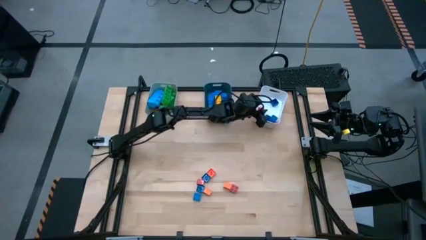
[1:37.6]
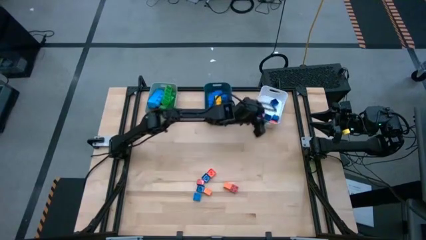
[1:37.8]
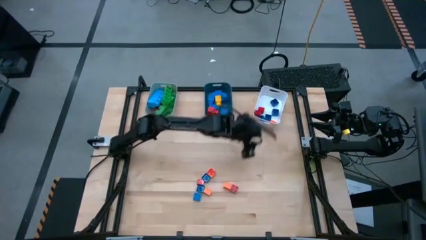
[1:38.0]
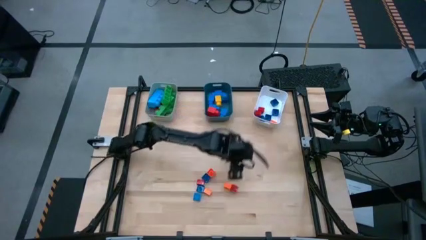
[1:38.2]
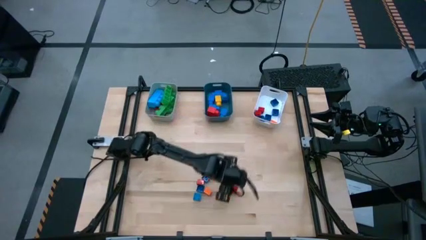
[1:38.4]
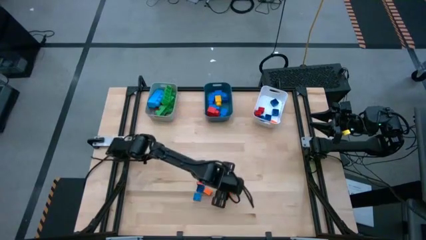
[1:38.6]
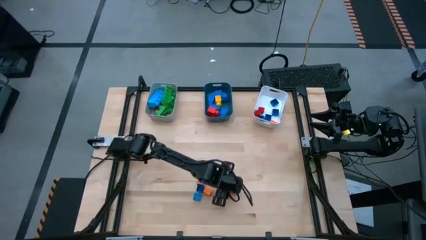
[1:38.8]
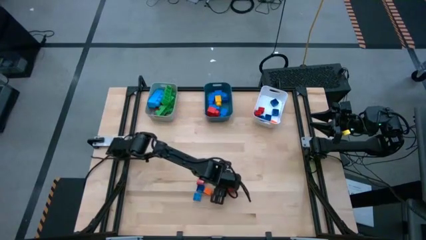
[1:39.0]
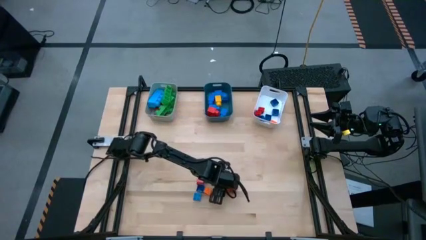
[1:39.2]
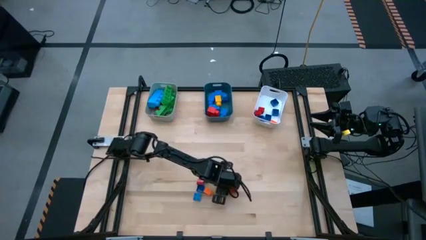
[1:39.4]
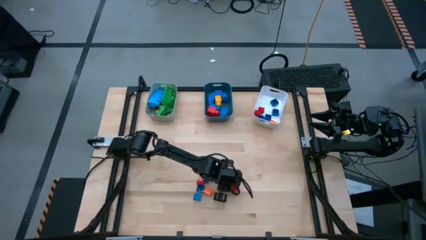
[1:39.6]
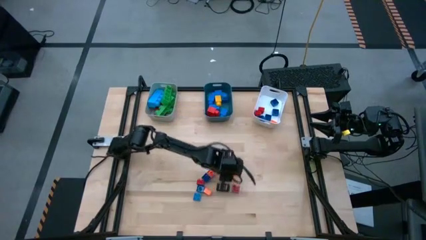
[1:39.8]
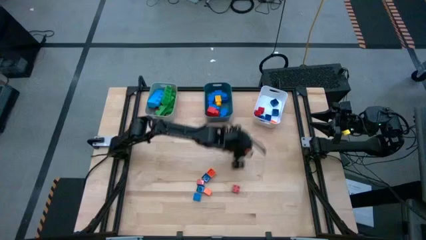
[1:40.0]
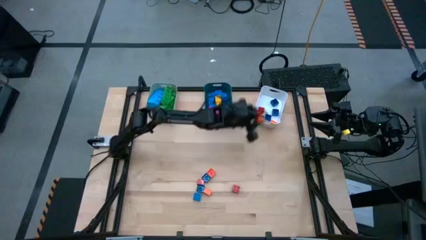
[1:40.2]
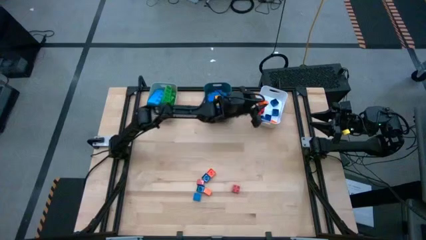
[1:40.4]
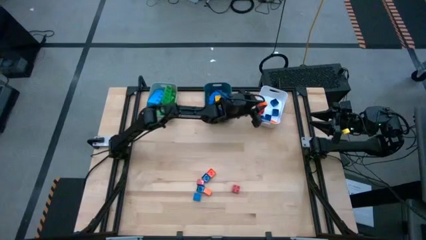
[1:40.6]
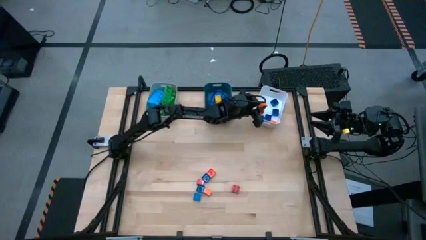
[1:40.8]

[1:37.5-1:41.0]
Task: Sort blocks by size
Put the small orange 4 stud game piece into the white bin

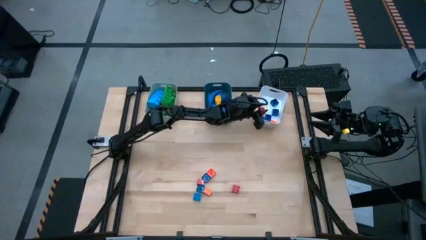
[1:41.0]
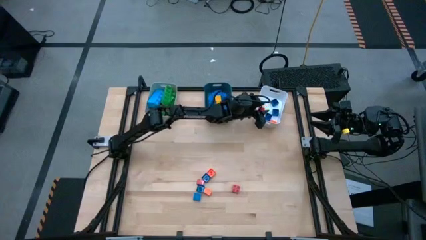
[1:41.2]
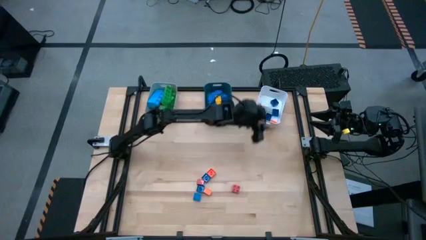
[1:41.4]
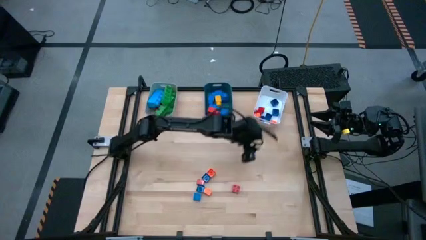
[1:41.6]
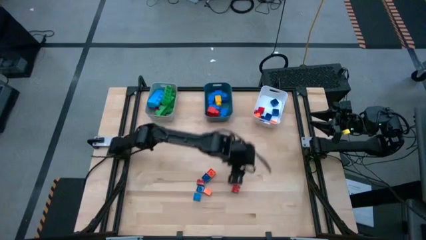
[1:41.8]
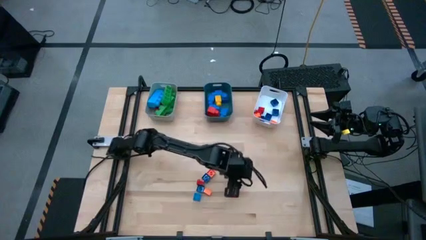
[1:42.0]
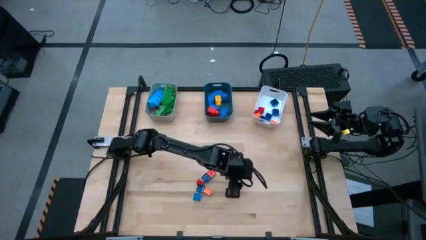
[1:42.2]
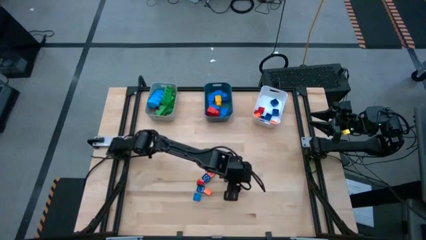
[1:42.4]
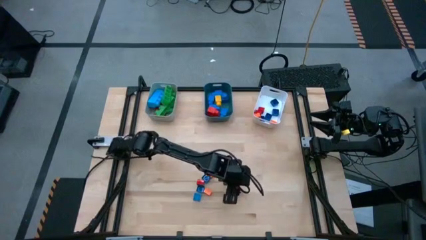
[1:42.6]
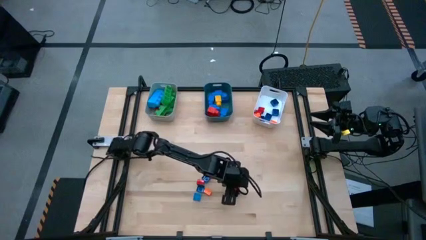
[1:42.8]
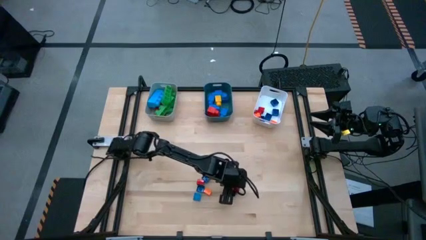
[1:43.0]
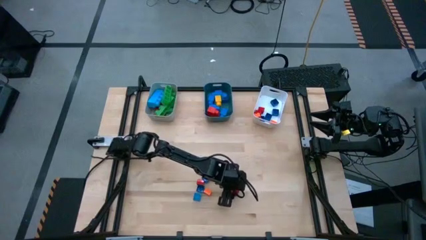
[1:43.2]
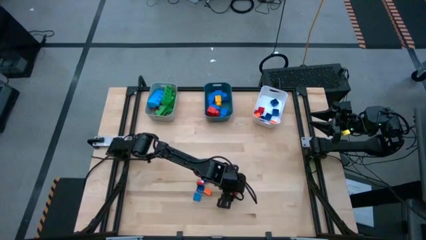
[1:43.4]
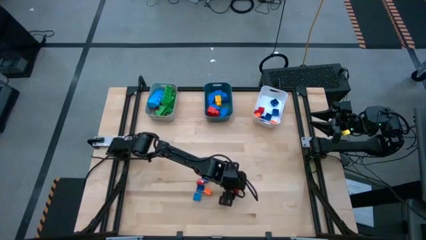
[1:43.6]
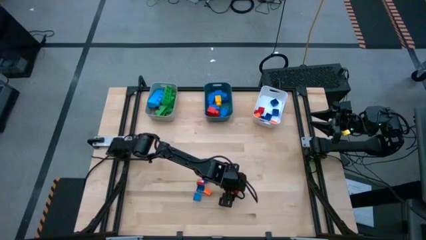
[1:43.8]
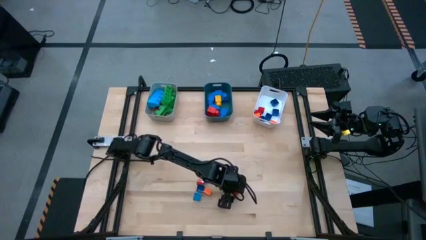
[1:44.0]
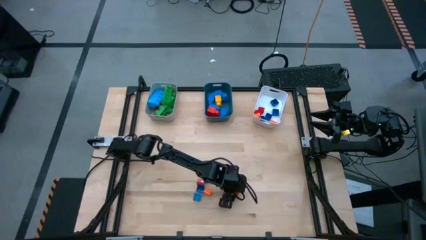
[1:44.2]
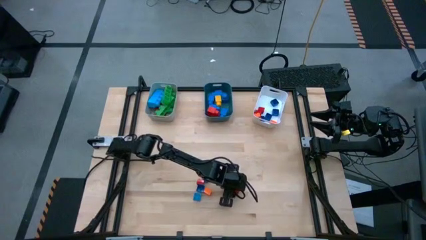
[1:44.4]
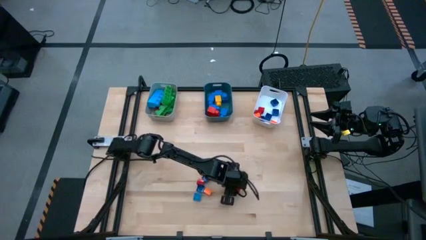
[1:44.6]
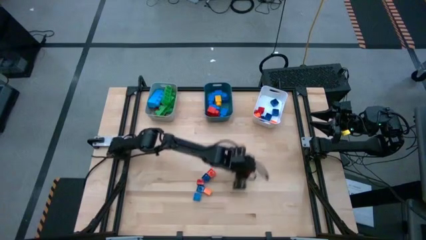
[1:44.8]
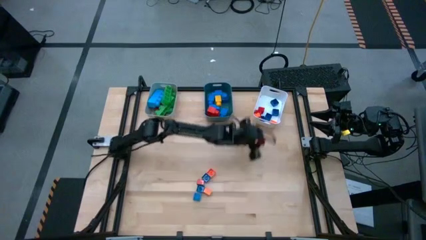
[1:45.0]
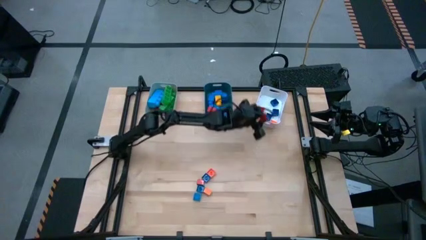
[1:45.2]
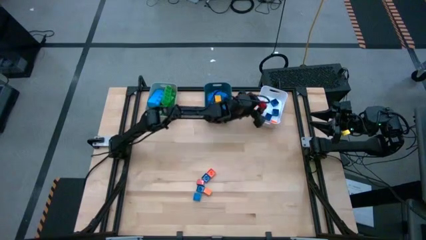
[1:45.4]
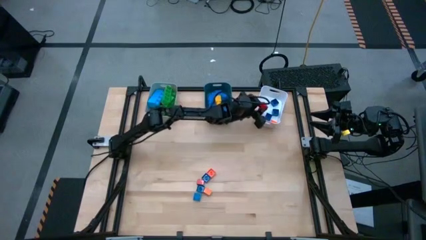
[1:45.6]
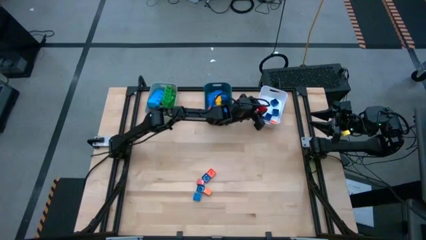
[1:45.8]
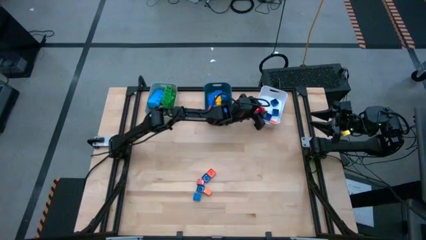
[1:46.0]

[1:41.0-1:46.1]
Put the small red 4 stud game piece into the white bin

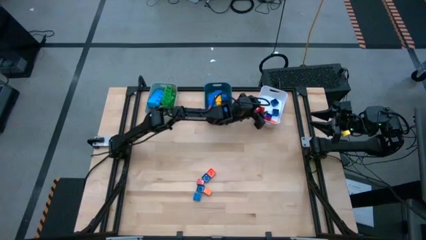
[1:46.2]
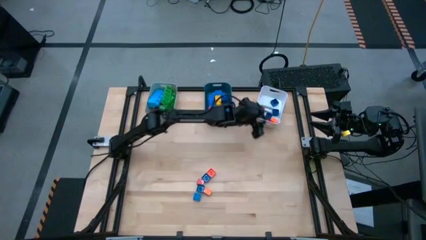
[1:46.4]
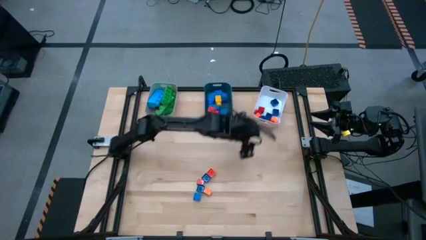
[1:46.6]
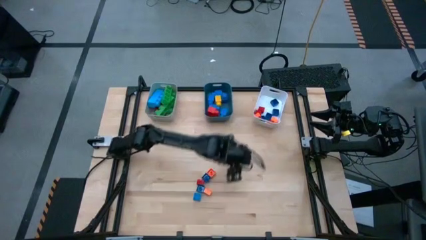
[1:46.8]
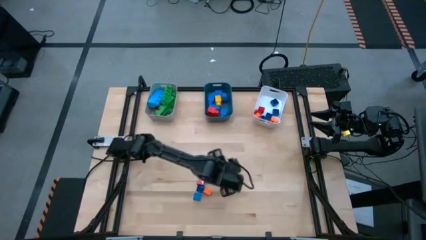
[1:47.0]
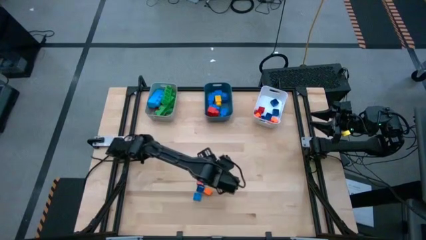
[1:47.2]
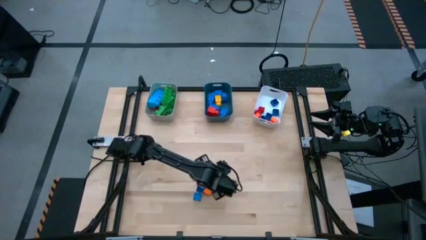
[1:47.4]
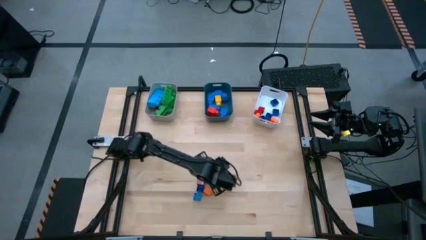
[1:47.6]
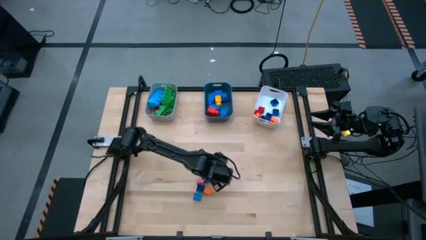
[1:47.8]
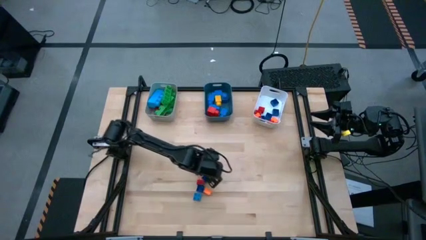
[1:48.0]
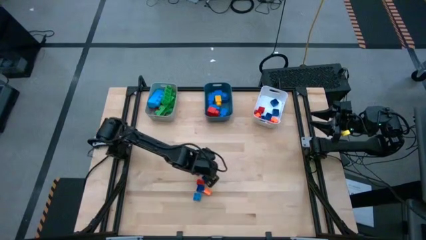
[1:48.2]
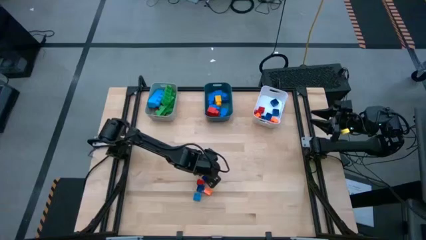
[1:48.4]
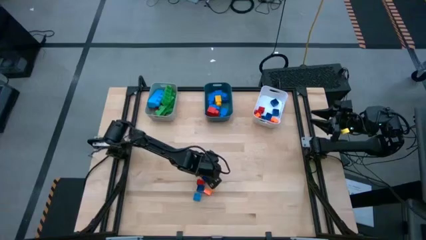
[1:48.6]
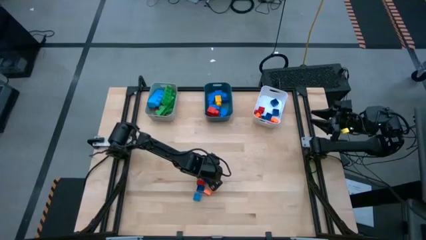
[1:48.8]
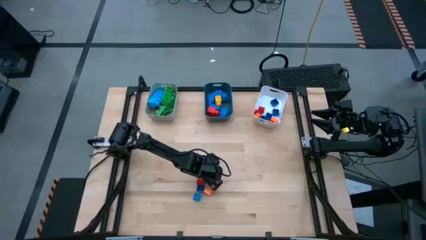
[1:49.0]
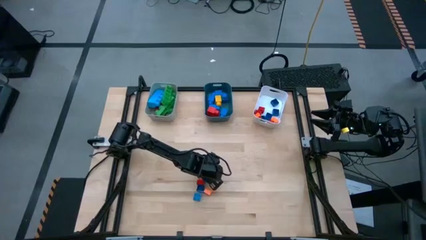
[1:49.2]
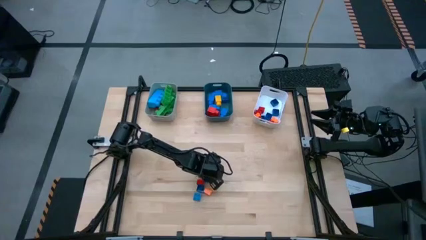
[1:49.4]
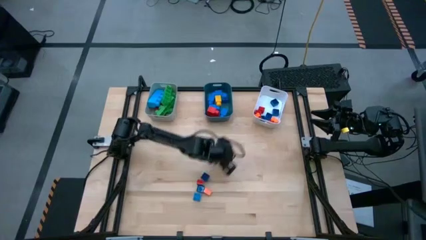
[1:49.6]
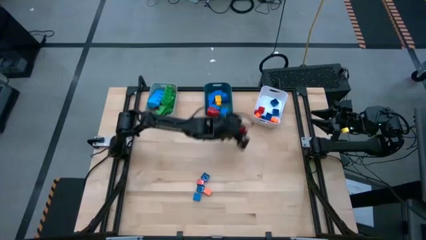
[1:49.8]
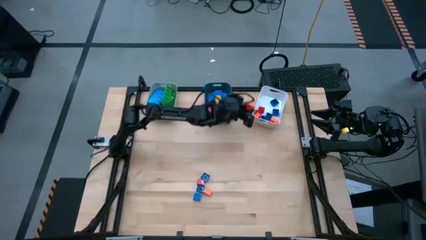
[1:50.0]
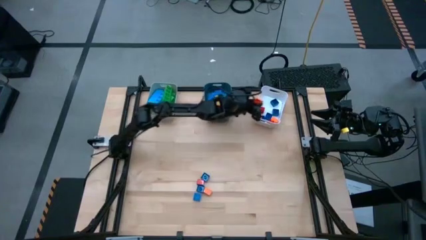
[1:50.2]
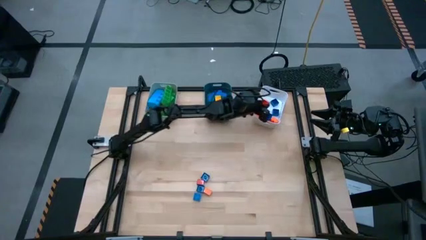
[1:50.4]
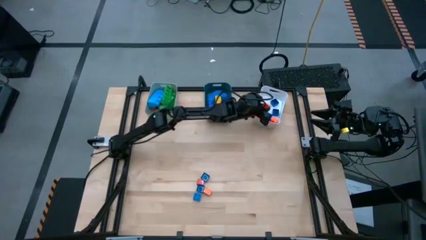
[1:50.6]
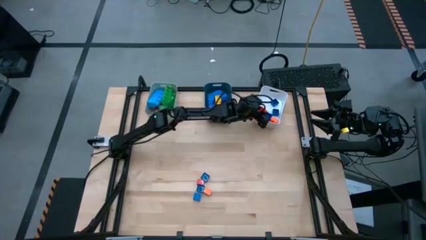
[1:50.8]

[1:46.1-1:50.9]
Put the small orange 4 stud game piece into the white bin

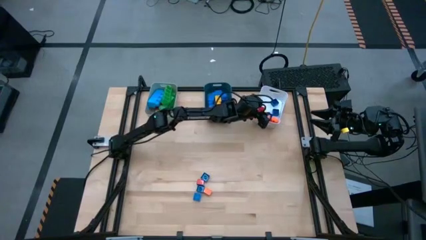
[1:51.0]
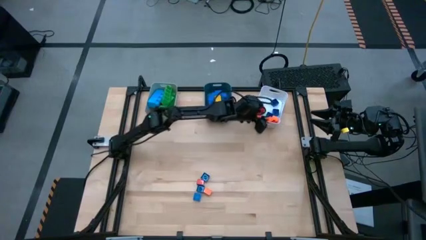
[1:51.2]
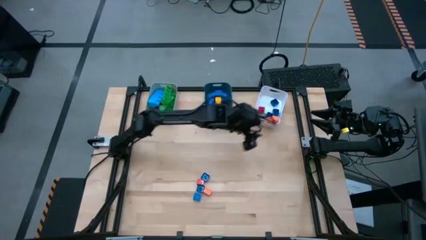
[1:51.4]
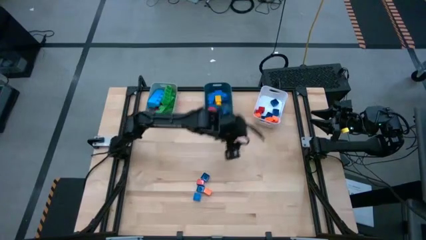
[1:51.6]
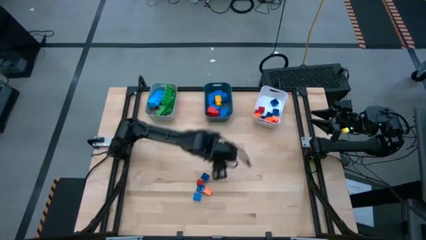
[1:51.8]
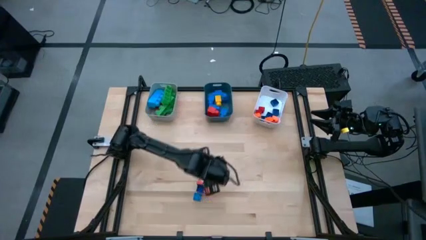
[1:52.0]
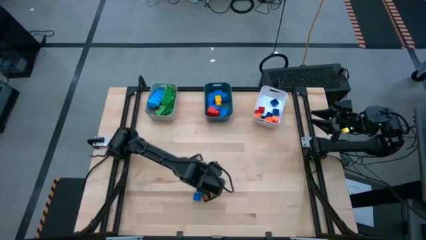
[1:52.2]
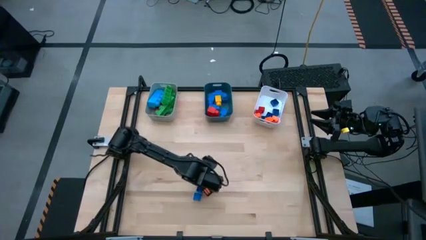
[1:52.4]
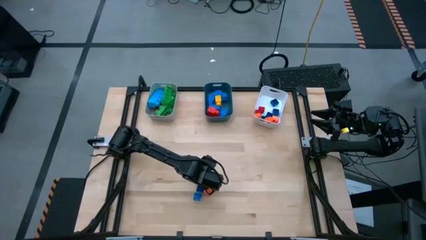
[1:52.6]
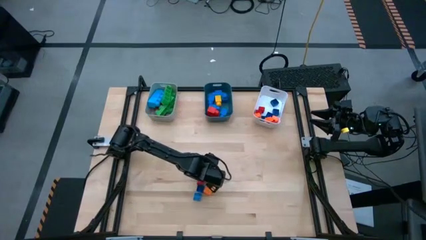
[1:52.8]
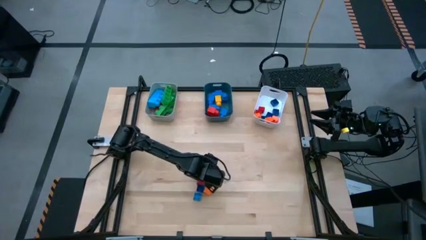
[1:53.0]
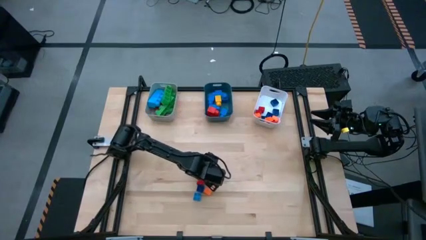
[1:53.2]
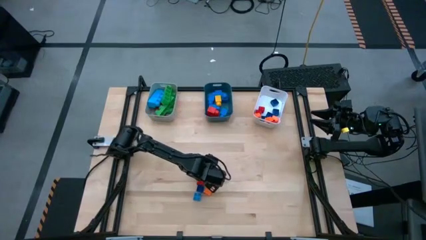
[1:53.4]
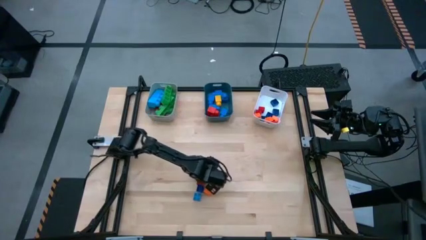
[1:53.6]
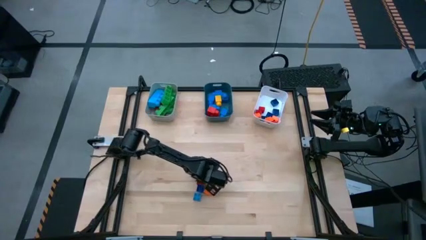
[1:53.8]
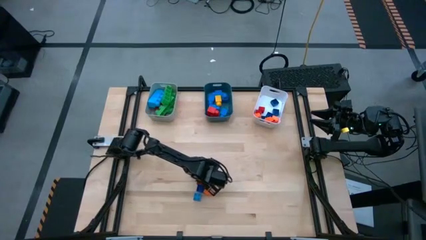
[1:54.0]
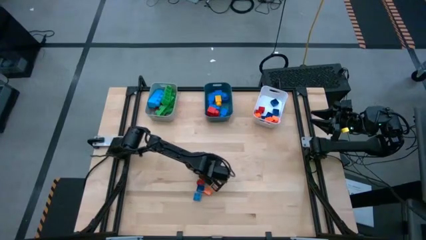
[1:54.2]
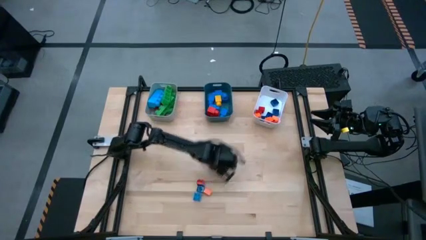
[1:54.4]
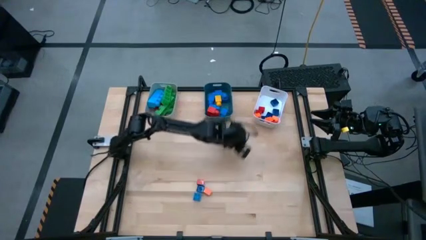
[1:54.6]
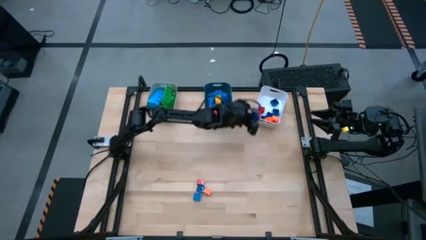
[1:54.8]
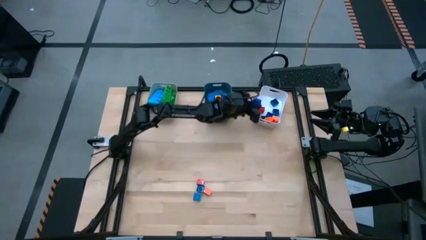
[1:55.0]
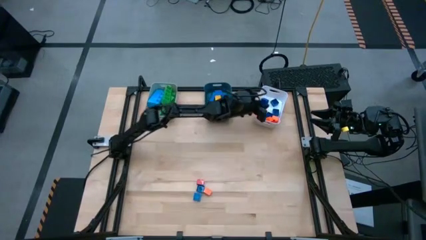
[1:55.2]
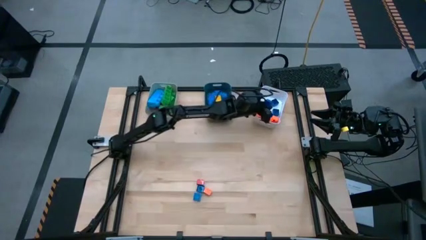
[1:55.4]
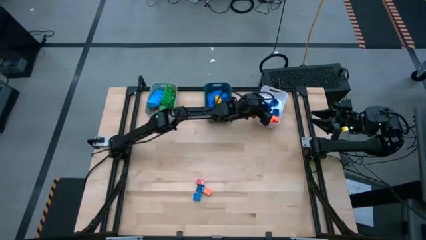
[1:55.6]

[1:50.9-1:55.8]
Put the small blue 4 stud game piece into the white bin
